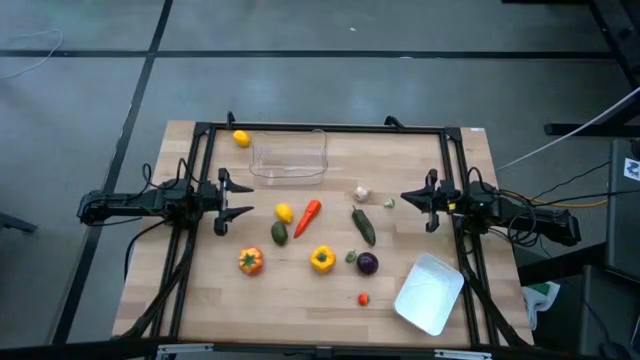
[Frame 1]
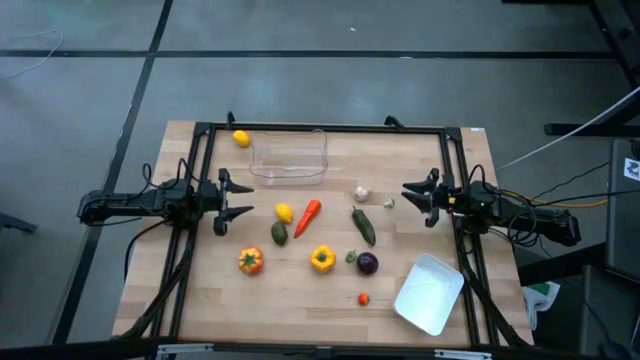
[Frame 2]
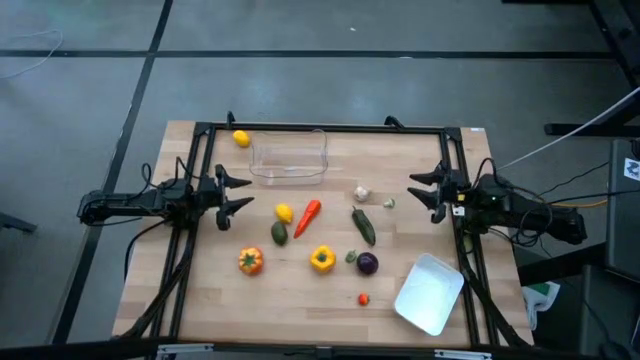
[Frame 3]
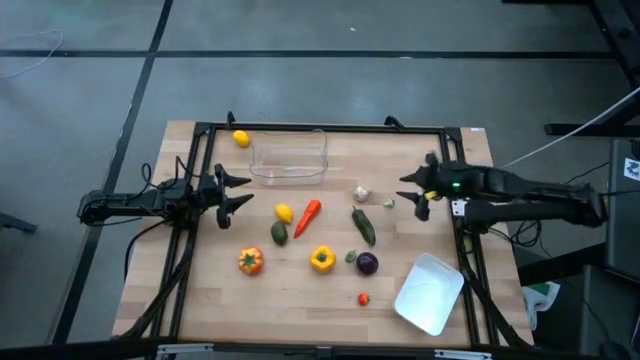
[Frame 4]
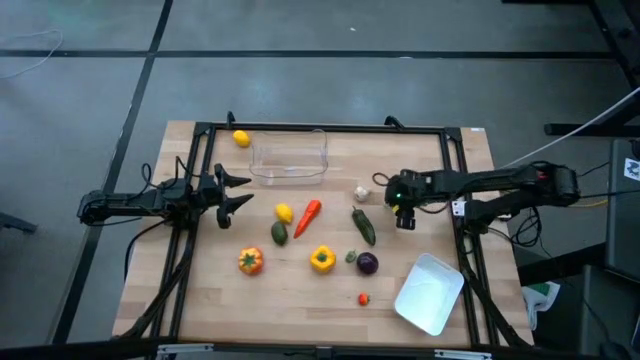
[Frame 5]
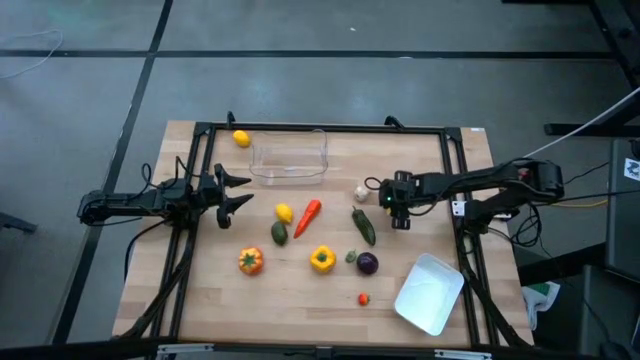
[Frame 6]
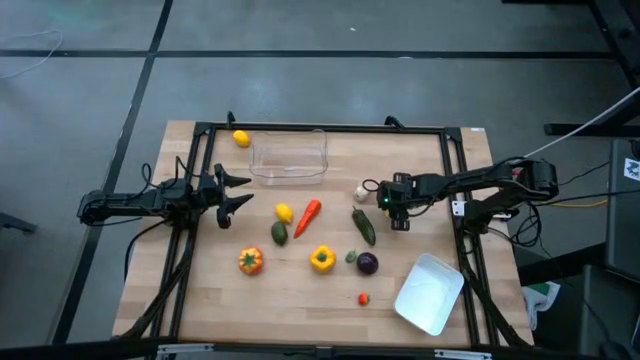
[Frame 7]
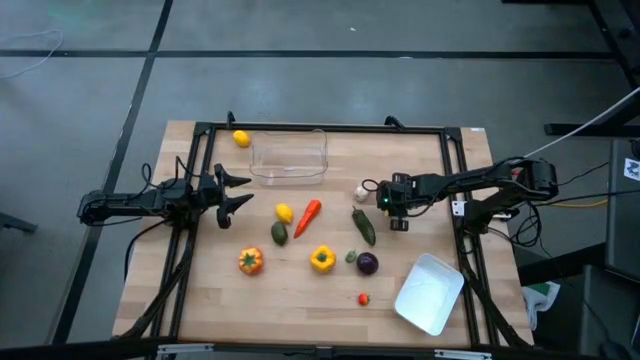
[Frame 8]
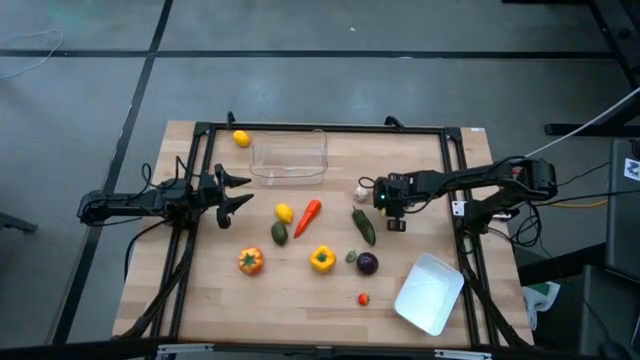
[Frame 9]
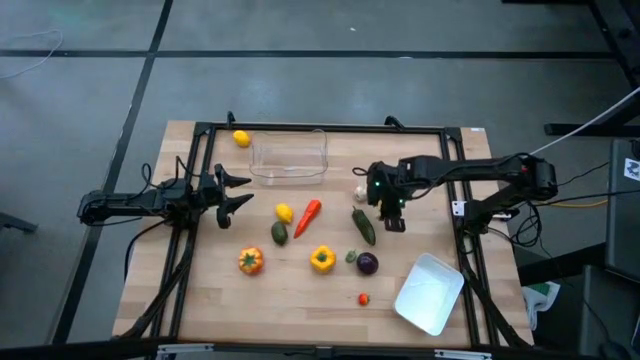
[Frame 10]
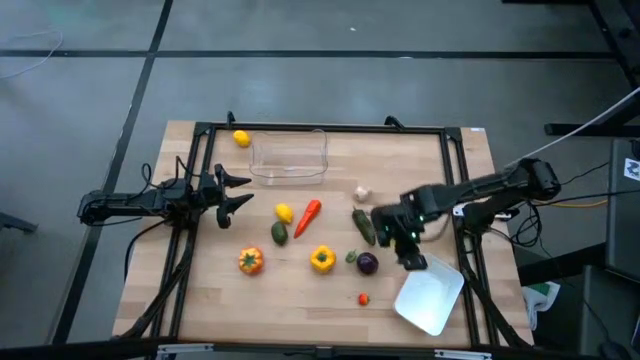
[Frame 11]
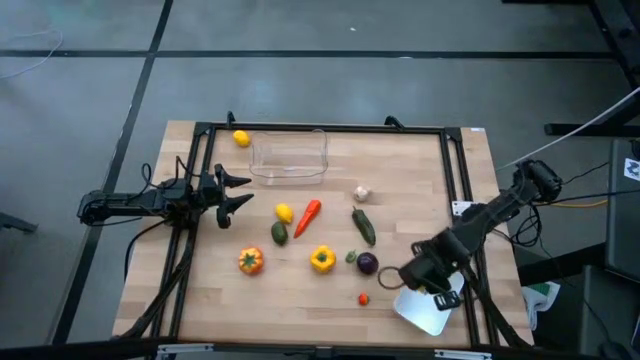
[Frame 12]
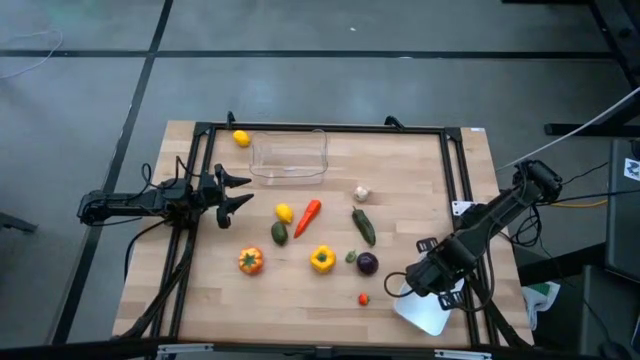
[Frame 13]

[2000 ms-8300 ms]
Task: Sort produce into baskets
Put the green mushroom into the white bin

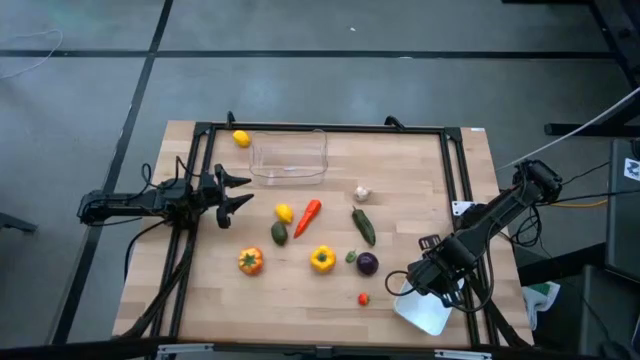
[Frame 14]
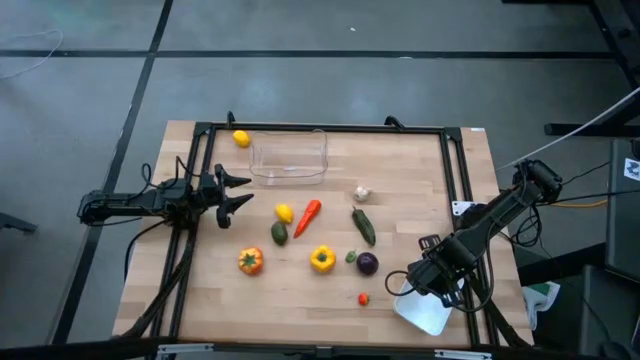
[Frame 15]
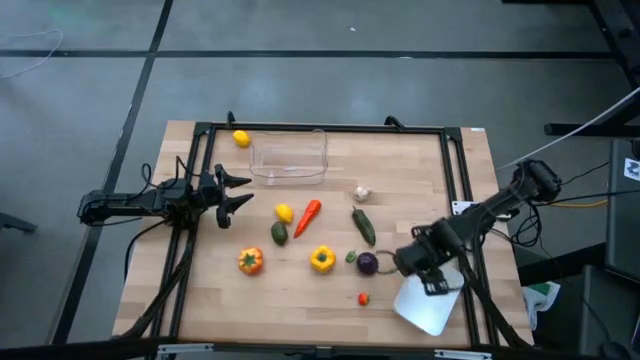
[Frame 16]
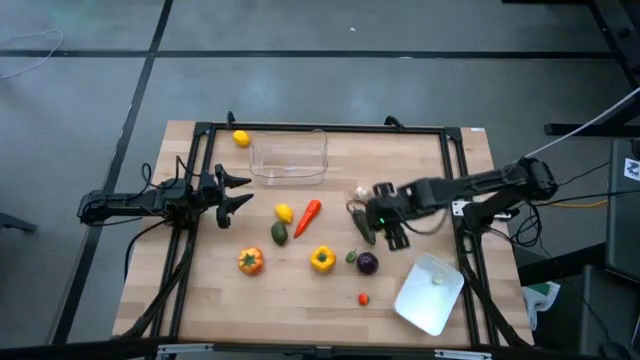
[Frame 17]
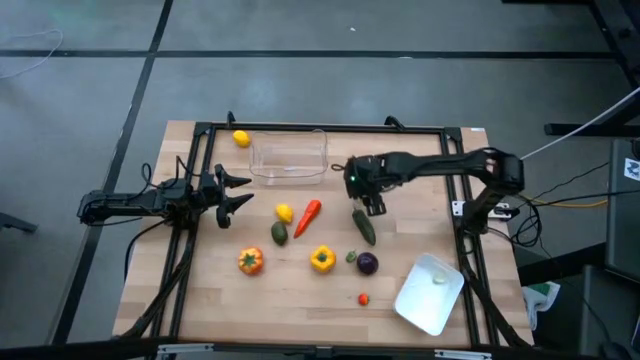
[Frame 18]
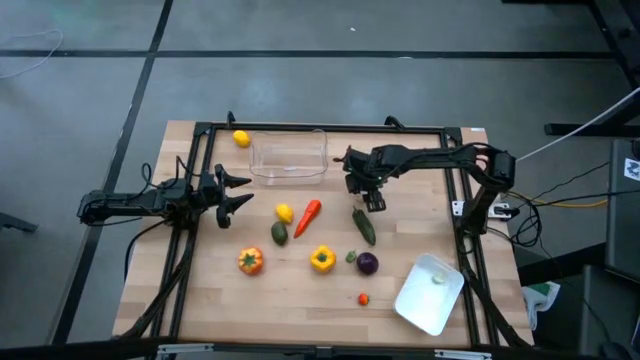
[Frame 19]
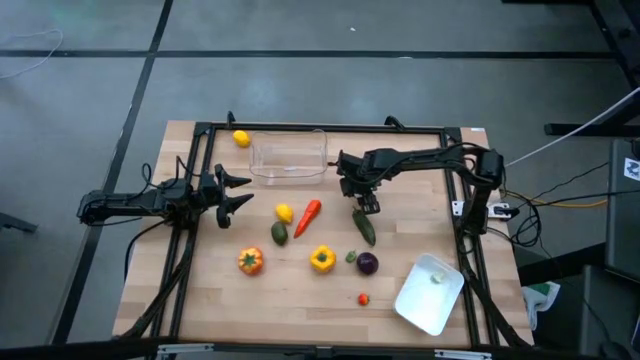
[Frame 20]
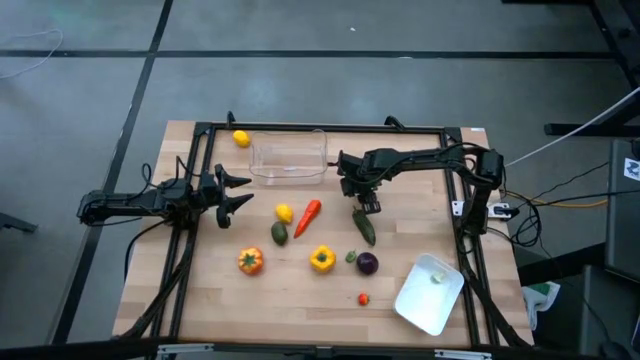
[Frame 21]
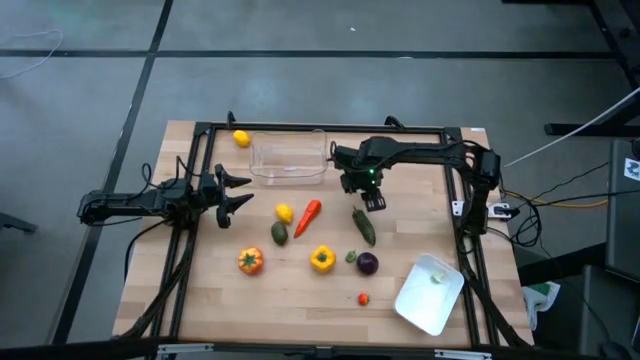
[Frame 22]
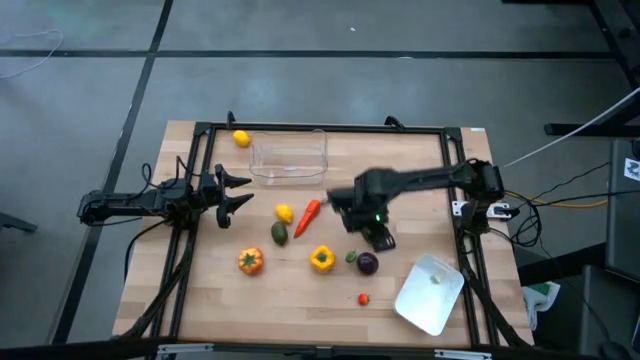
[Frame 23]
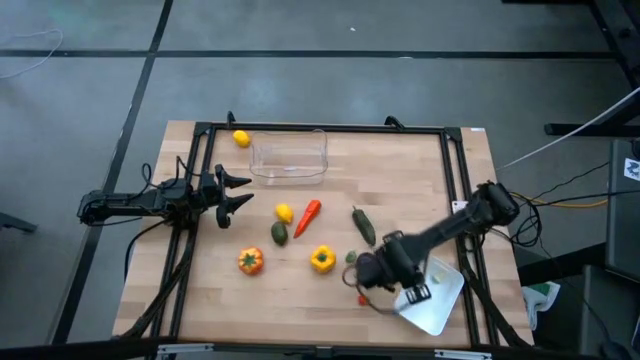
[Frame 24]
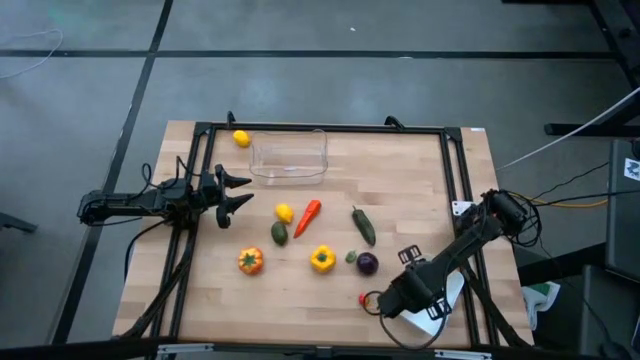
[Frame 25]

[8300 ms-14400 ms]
Put the white garlic into the white bin

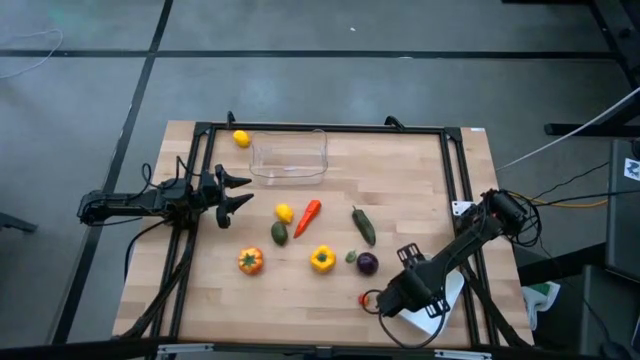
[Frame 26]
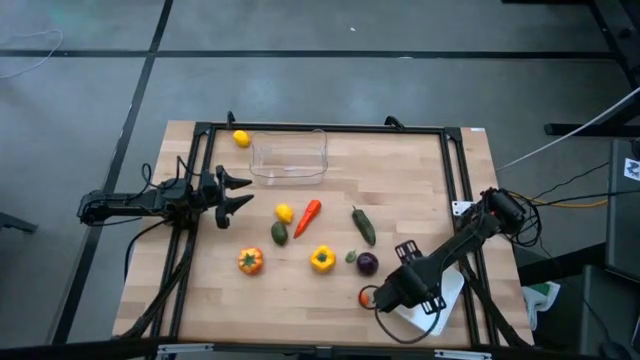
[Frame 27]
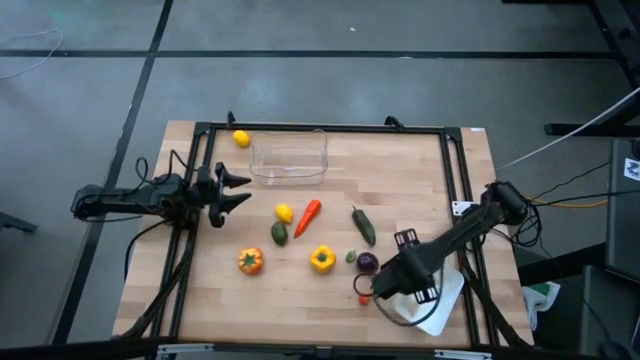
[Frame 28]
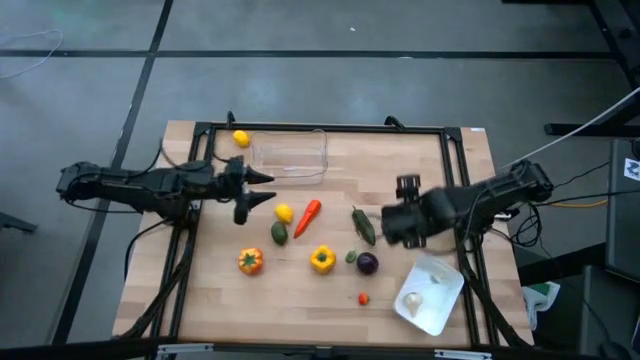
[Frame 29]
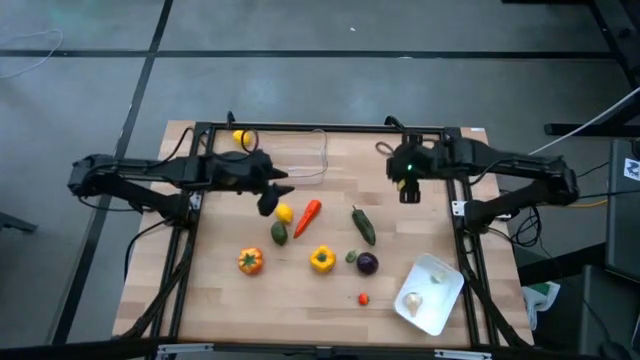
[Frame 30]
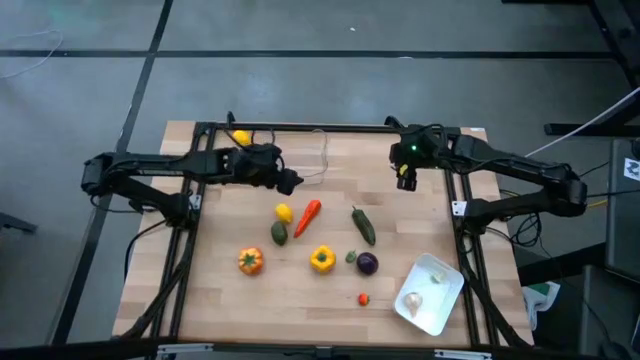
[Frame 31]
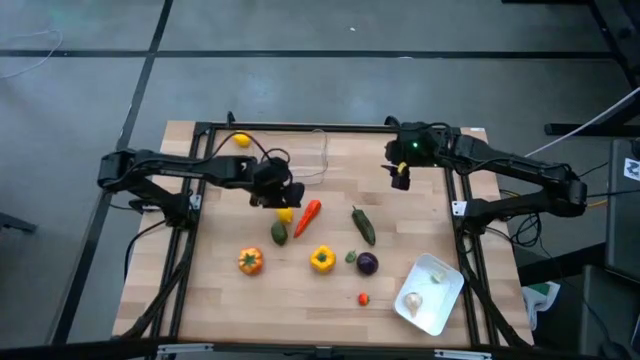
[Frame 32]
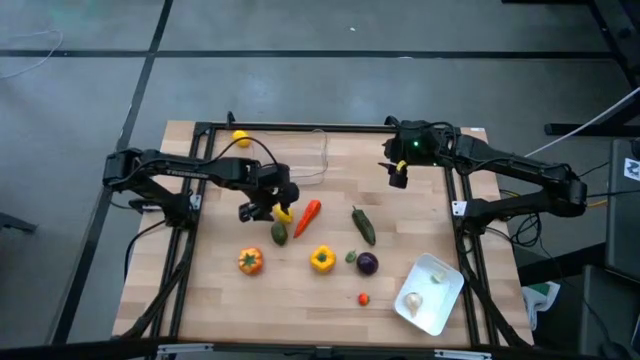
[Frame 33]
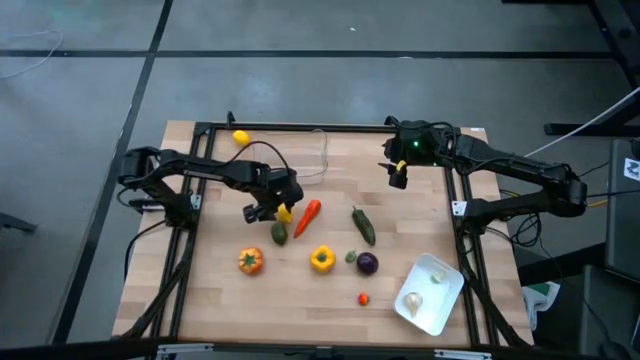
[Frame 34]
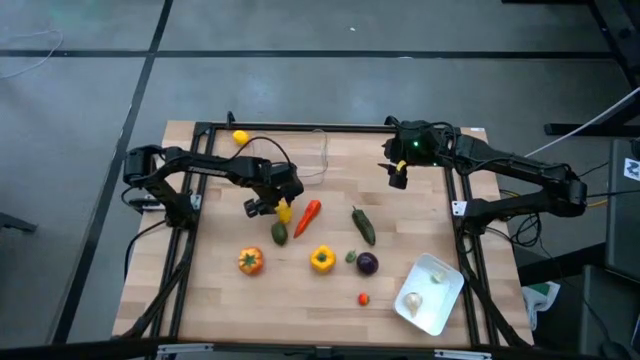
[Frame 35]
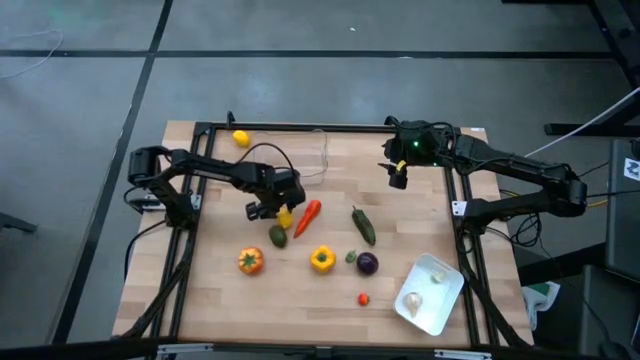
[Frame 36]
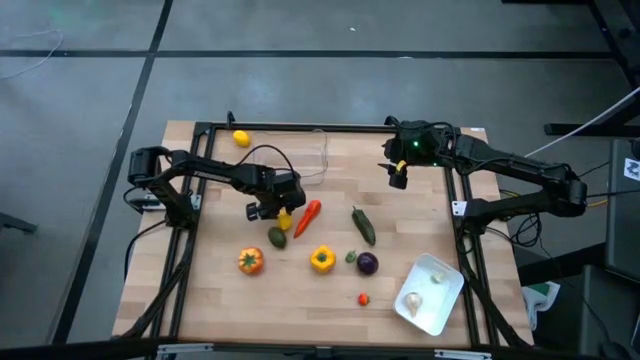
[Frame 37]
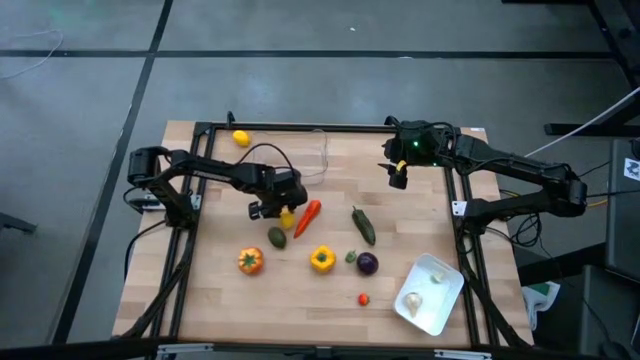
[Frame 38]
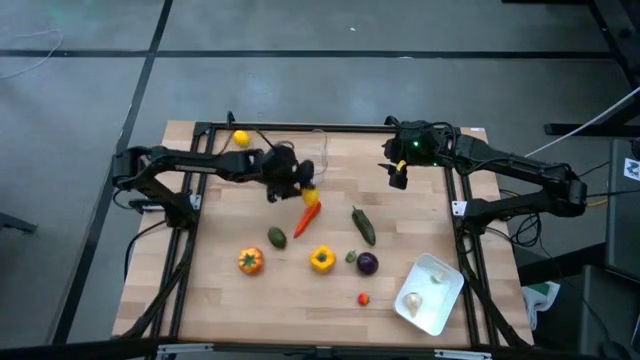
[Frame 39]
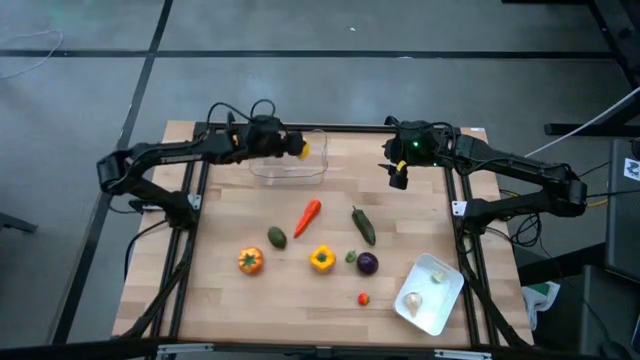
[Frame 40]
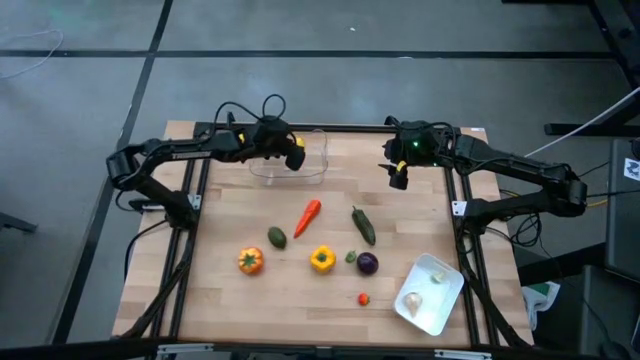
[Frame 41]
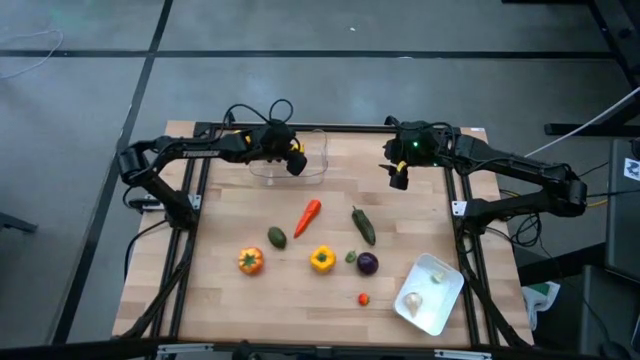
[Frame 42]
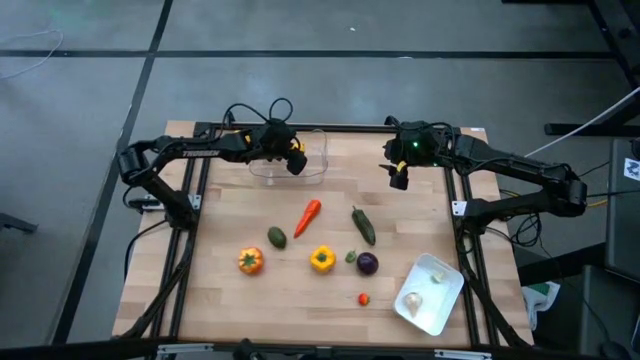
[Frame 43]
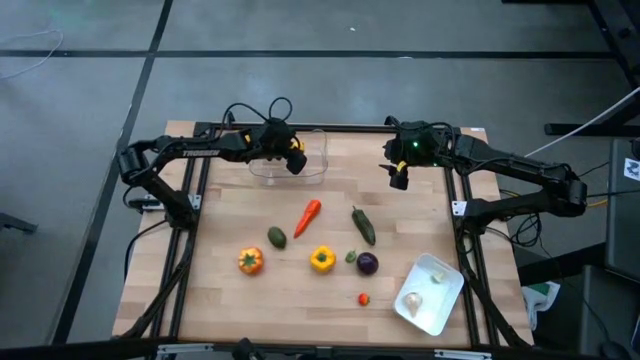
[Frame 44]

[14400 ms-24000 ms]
Put the bottom yellow lemon into the transparent bin
